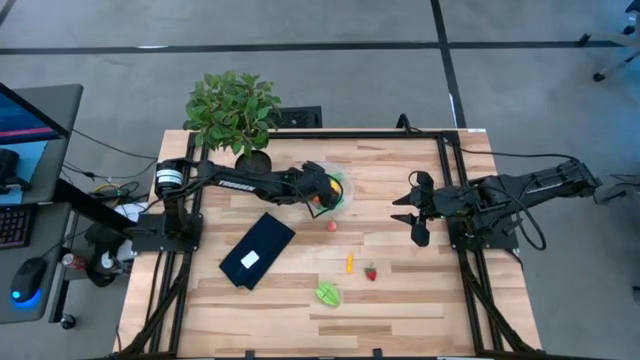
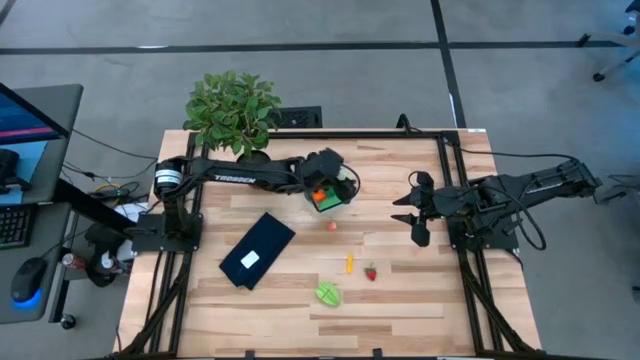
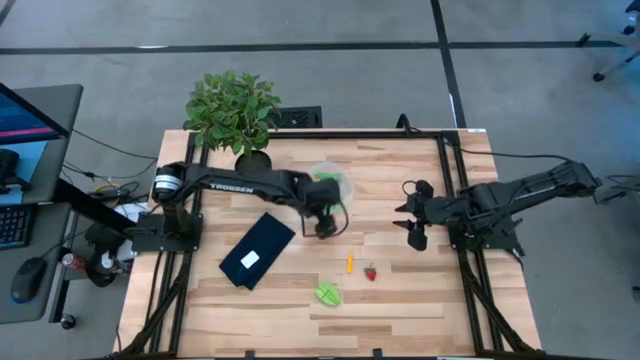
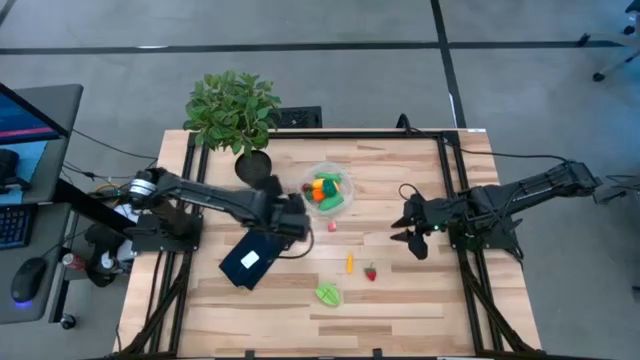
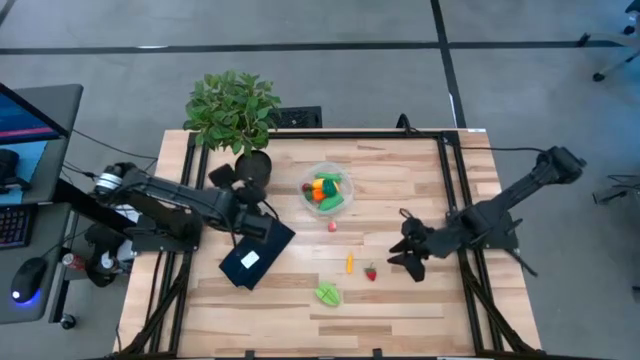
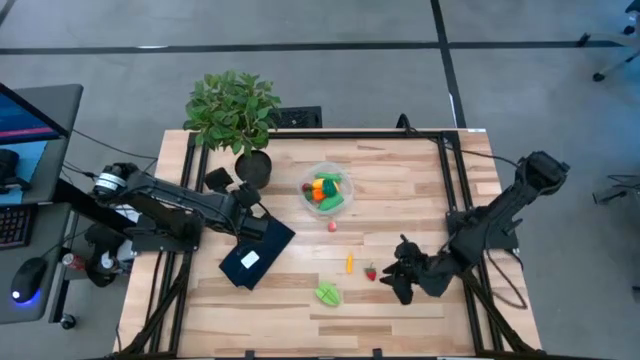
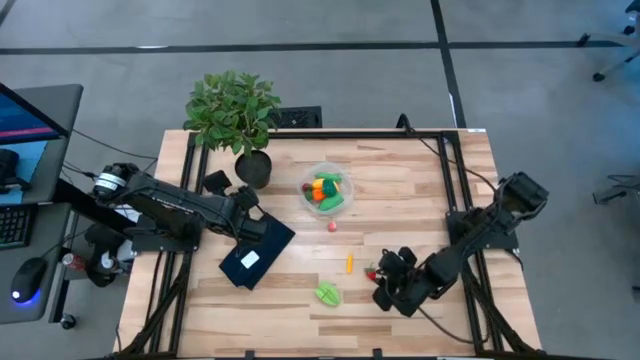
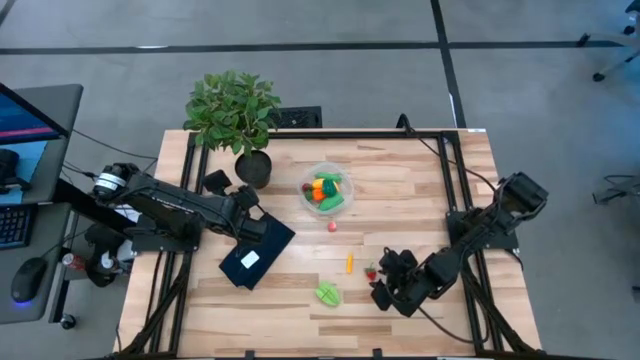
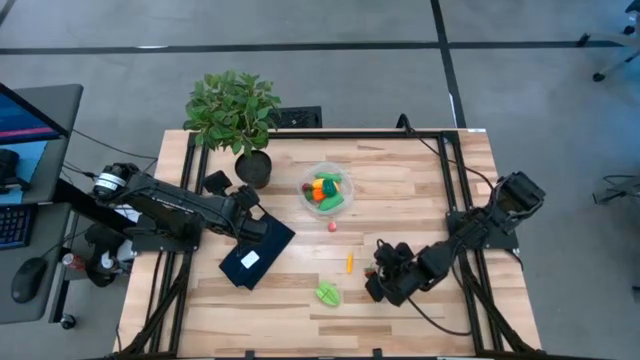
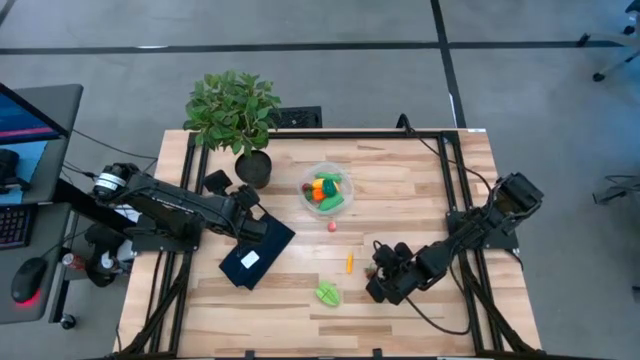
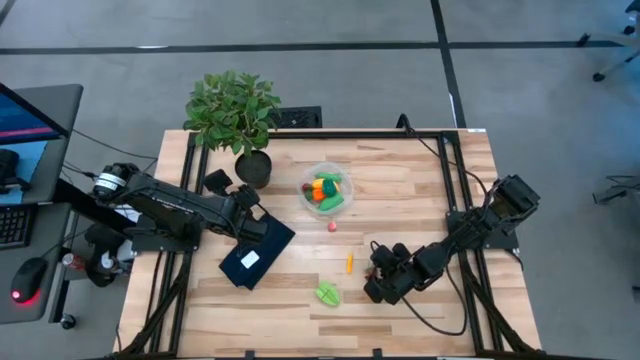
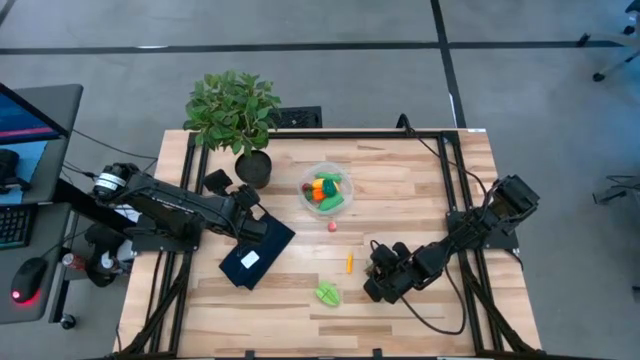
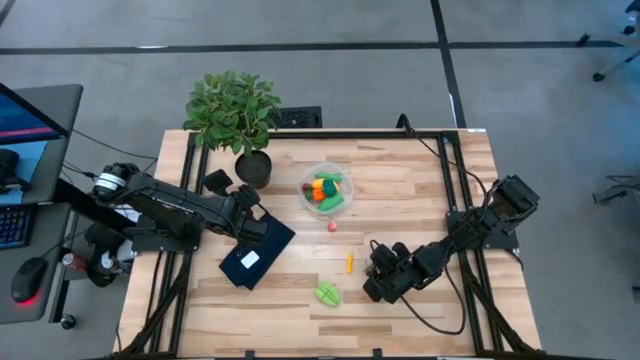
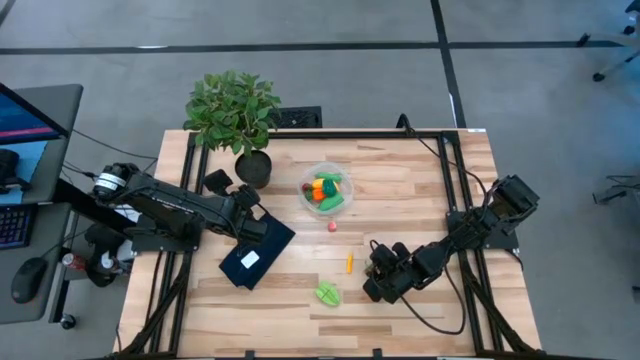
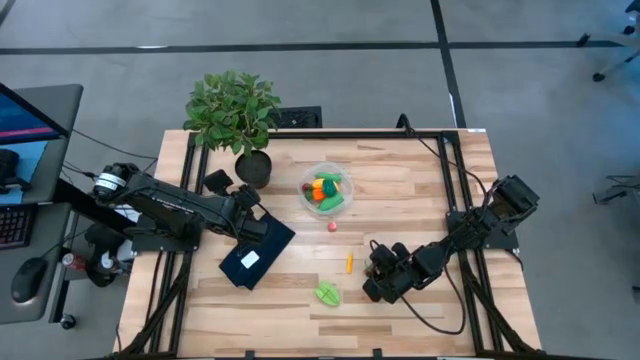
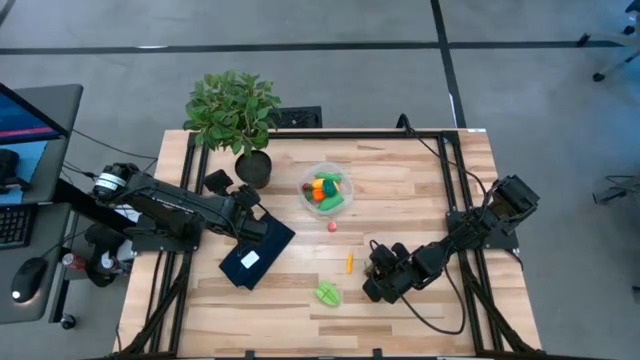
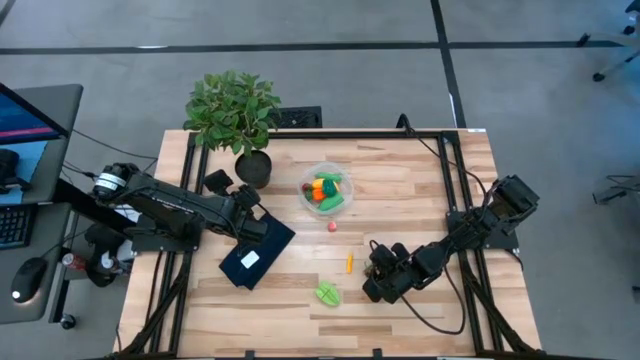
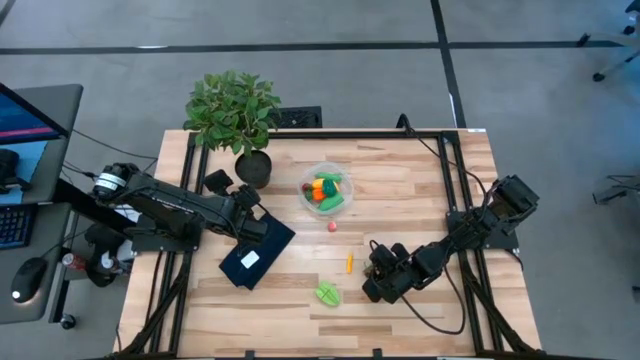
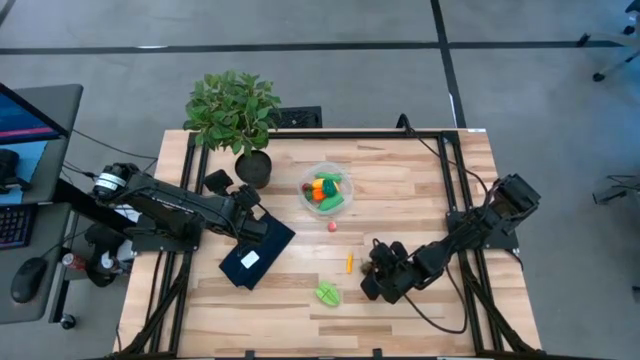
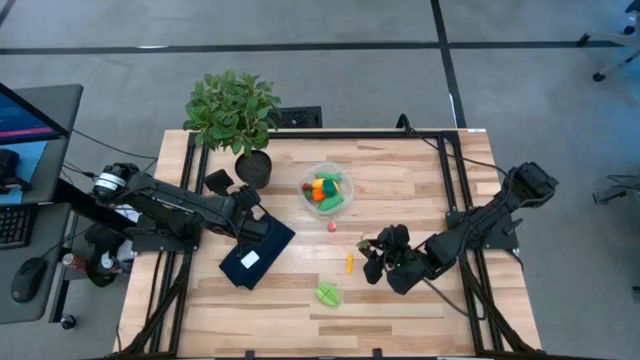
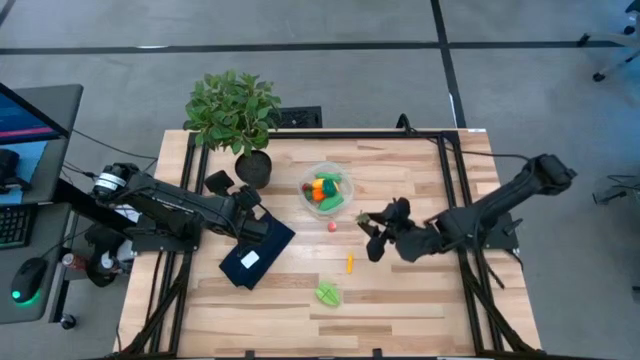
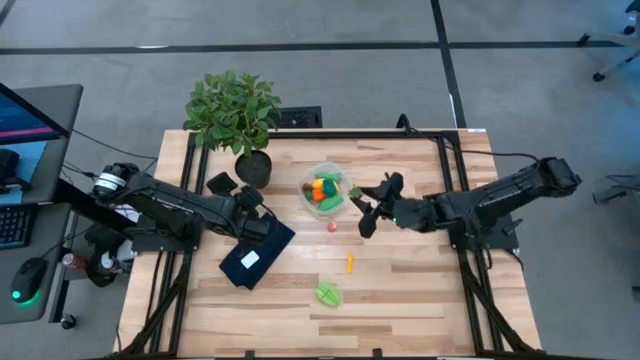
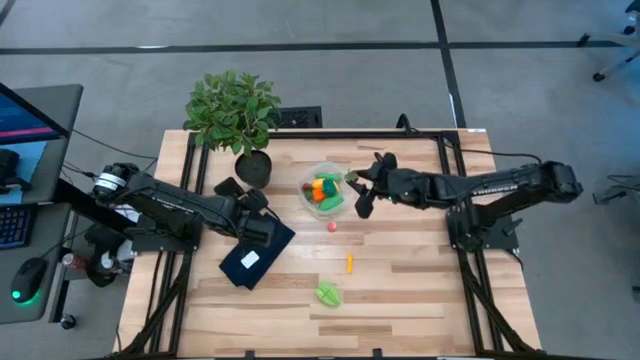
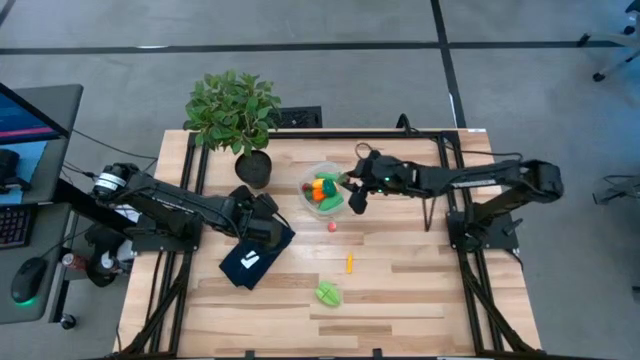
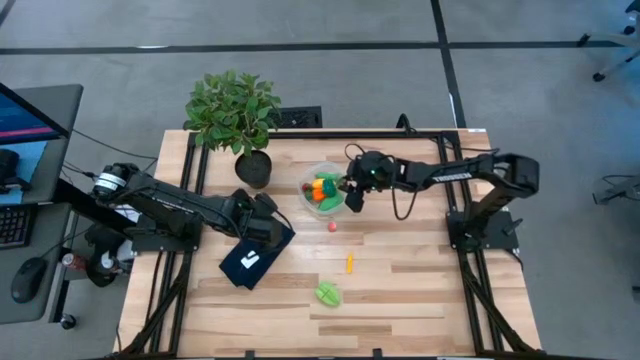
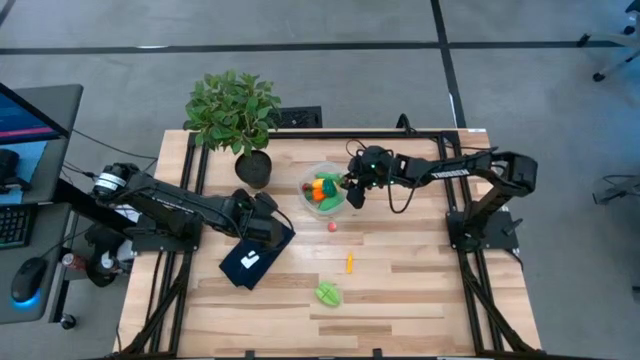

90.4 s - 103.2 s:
Task: Pick and placing Produce into tupperware
Put the red strawberry into the transparent bin

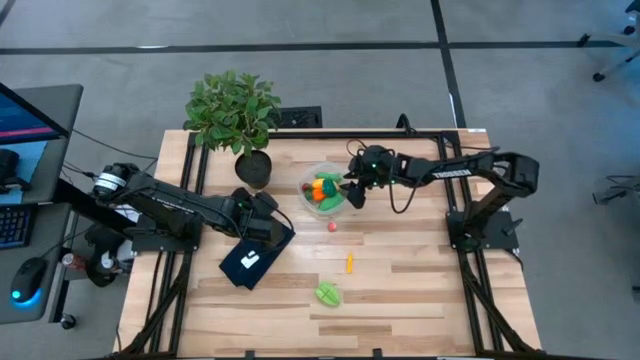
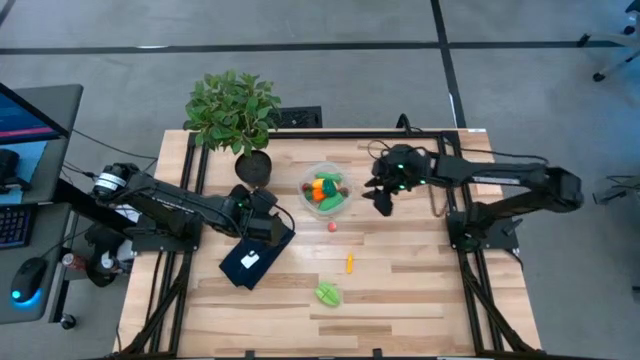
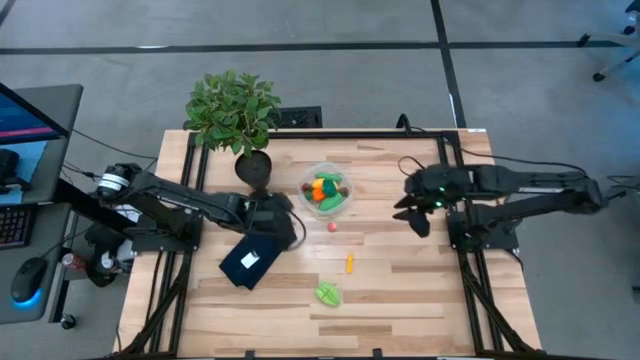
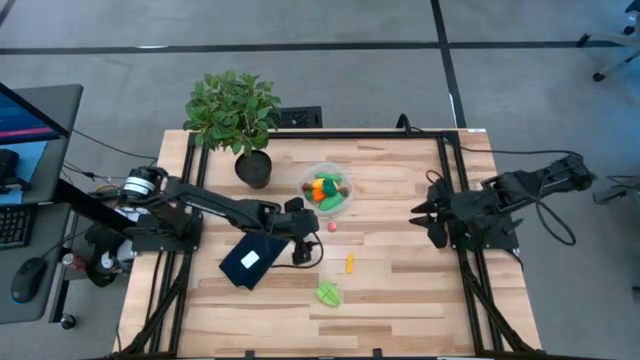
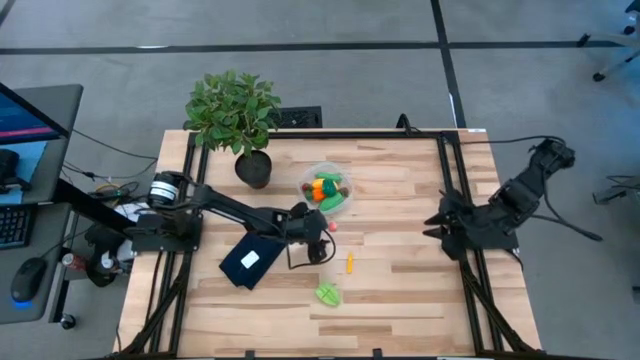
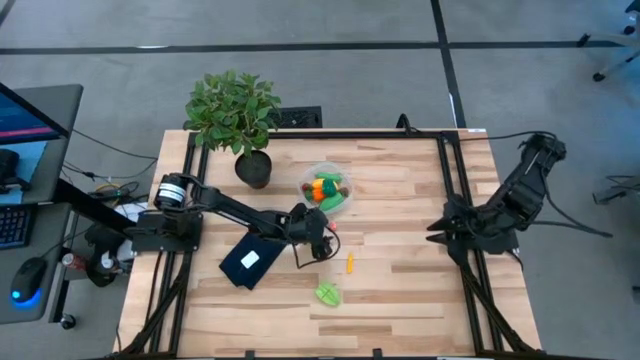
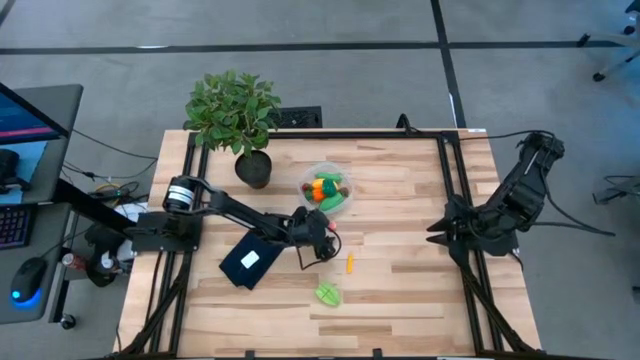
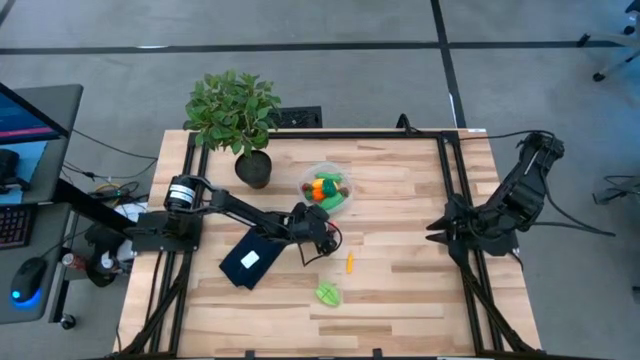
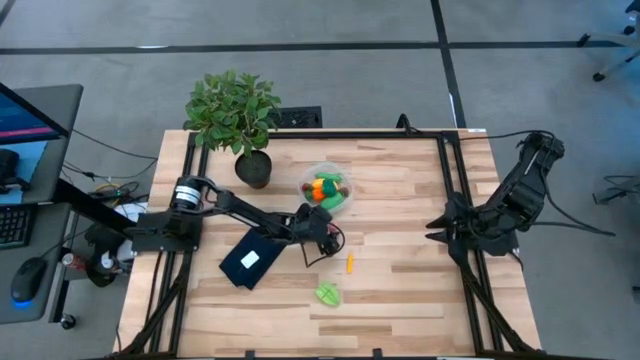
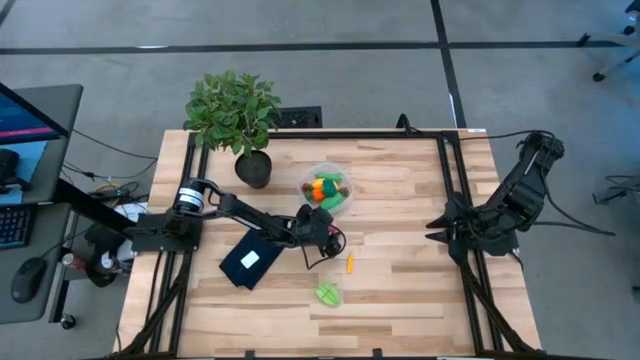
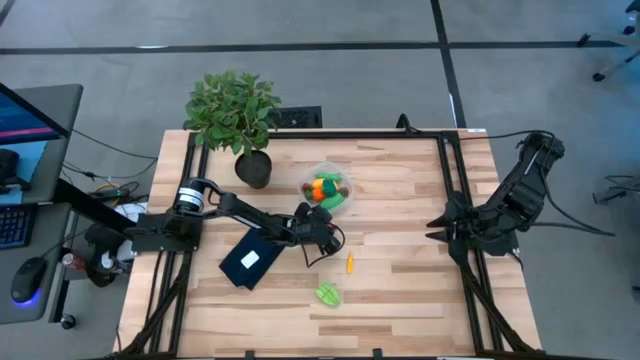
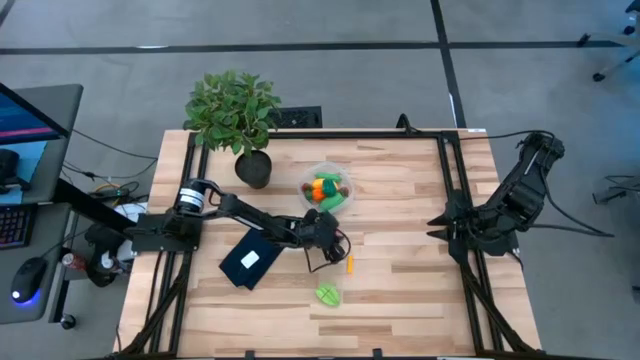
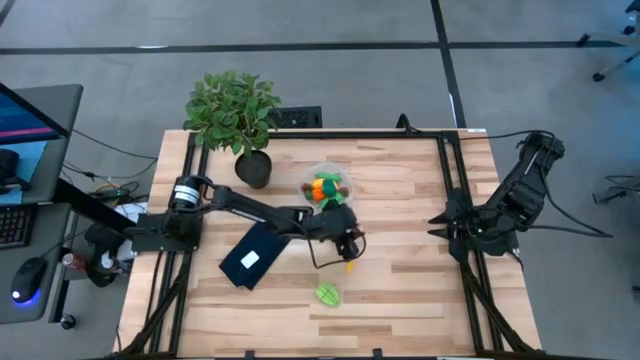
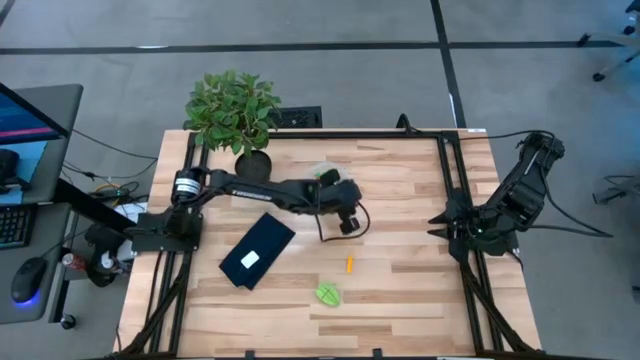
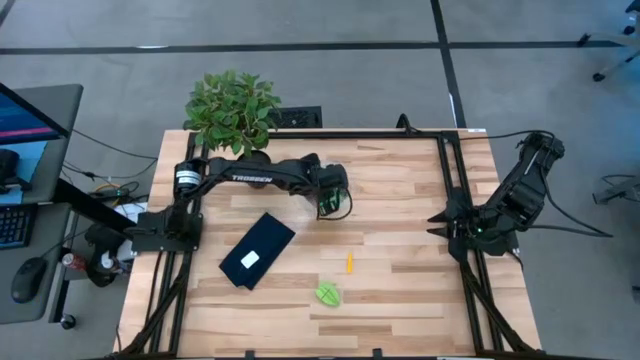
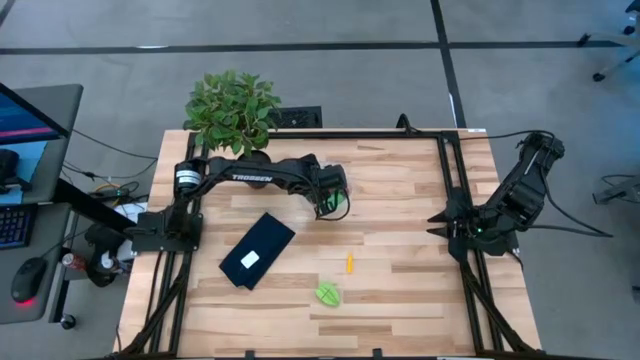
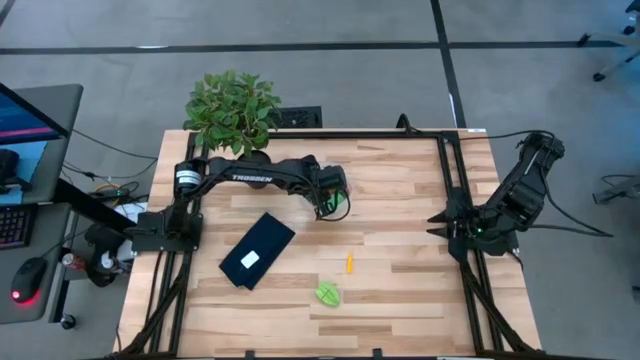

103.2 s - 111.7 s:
Put the pink peach into the transparent bin

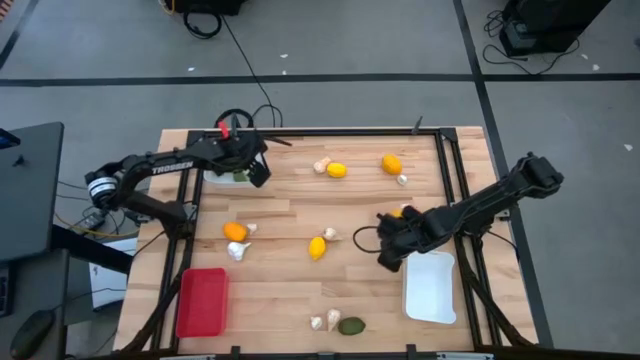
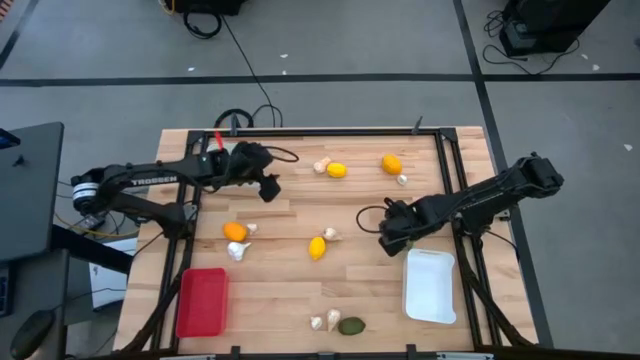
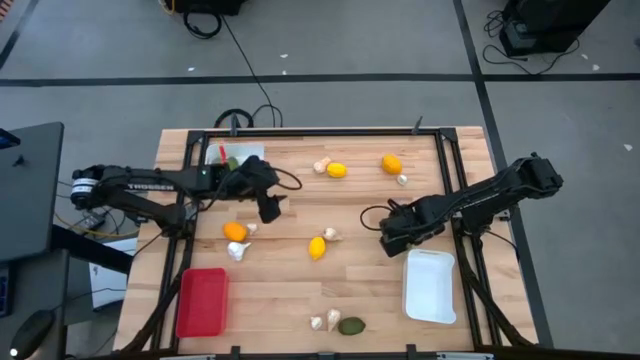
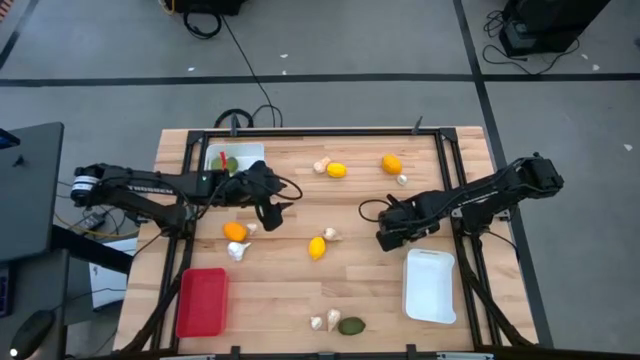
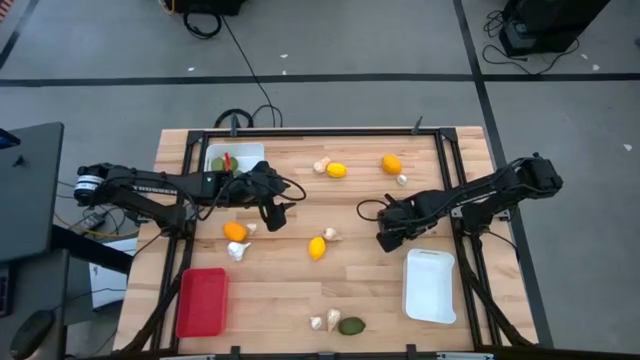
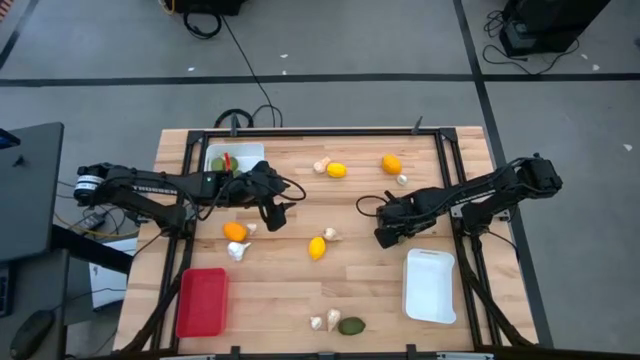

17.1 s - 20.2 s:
Task: Sort produce into baskets
Put the top green lime into the top white bin
